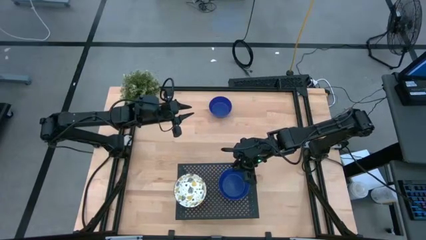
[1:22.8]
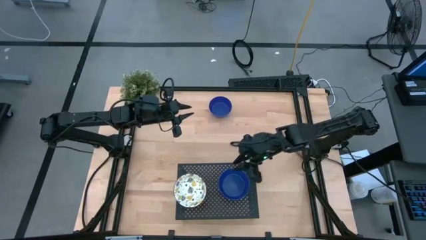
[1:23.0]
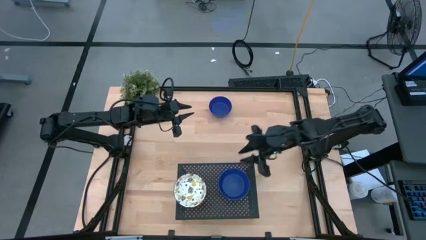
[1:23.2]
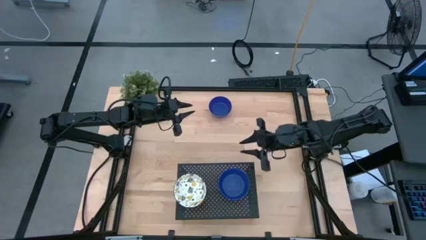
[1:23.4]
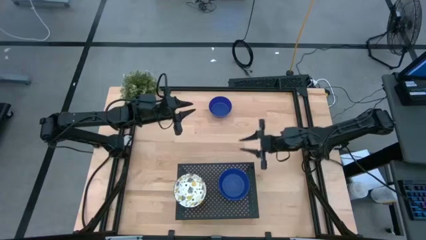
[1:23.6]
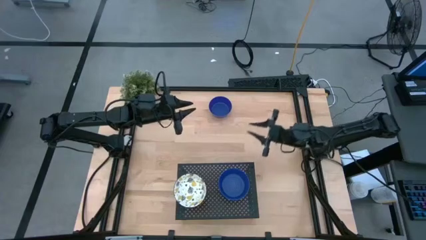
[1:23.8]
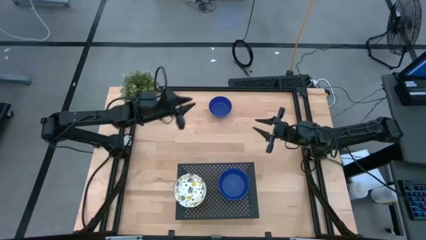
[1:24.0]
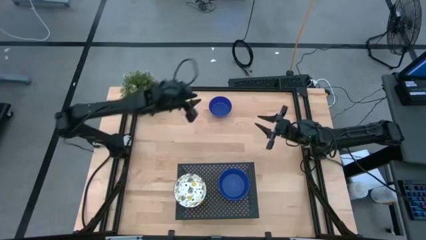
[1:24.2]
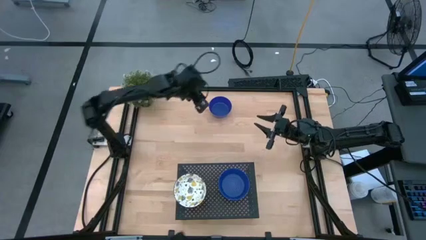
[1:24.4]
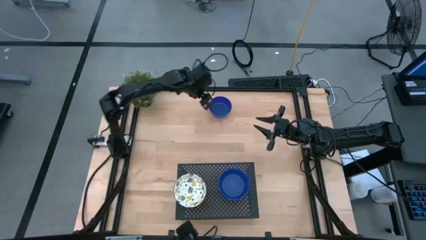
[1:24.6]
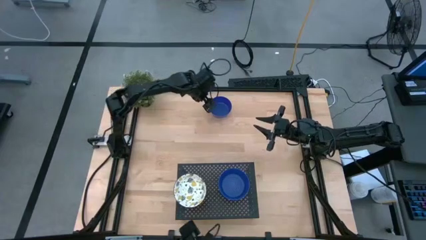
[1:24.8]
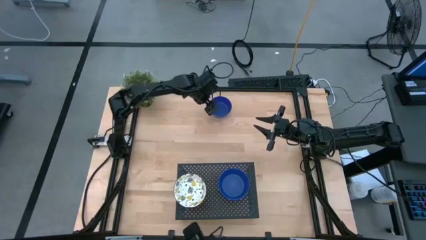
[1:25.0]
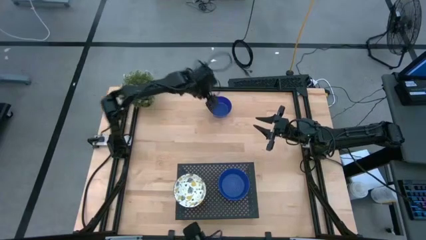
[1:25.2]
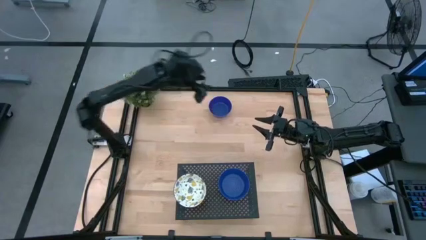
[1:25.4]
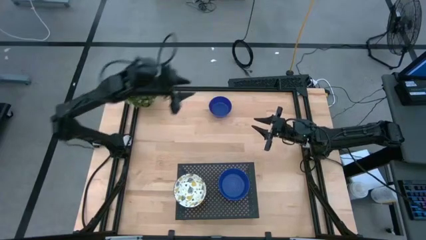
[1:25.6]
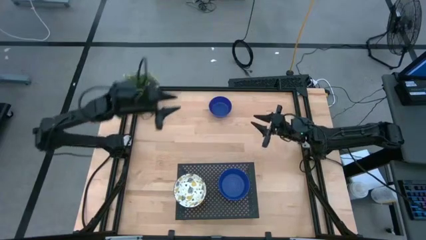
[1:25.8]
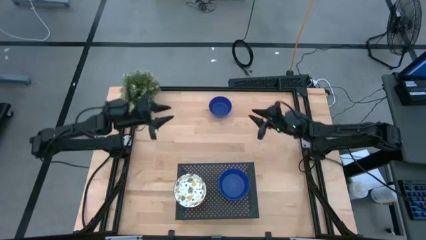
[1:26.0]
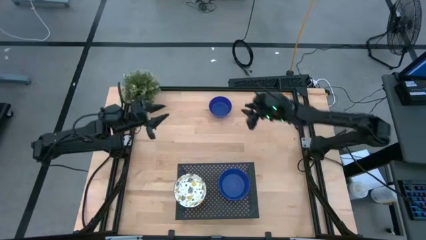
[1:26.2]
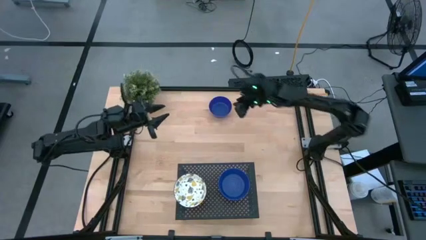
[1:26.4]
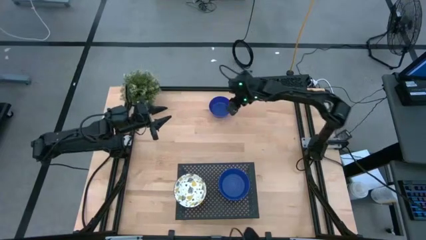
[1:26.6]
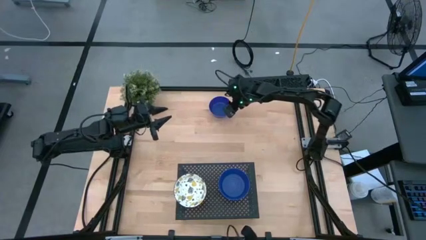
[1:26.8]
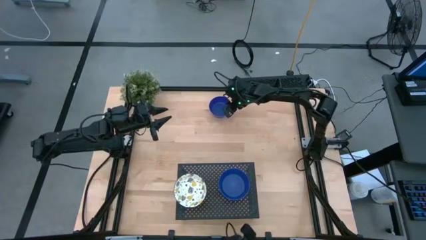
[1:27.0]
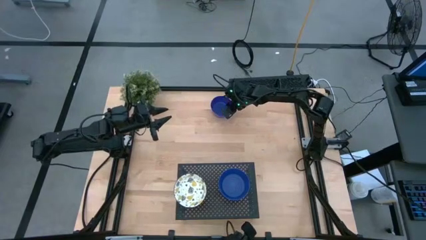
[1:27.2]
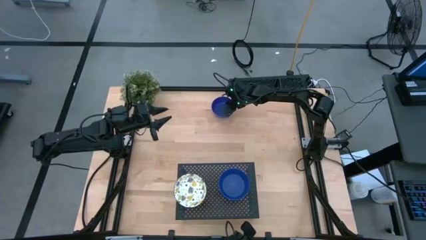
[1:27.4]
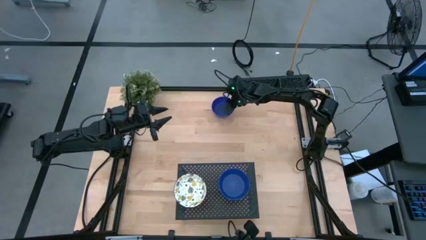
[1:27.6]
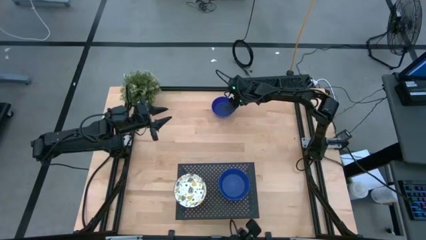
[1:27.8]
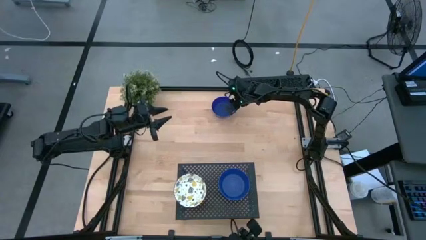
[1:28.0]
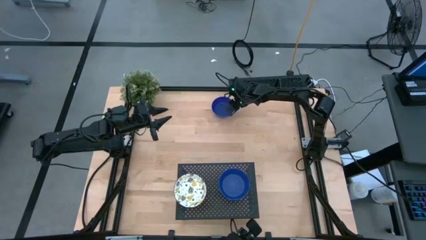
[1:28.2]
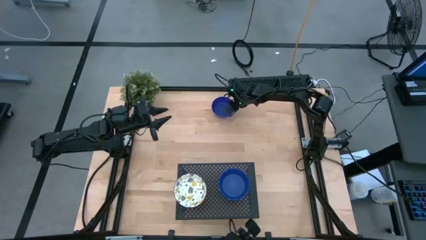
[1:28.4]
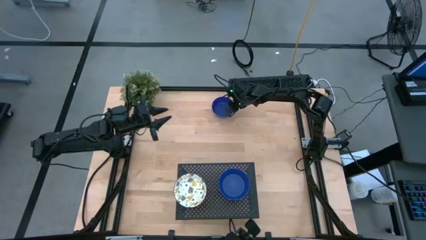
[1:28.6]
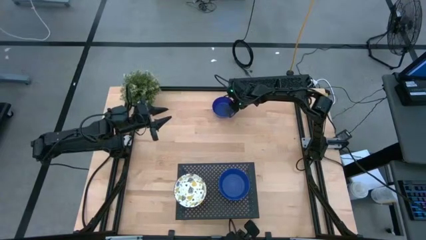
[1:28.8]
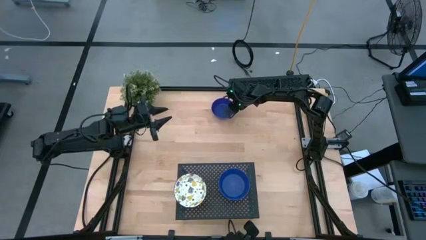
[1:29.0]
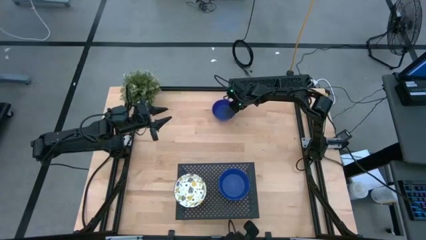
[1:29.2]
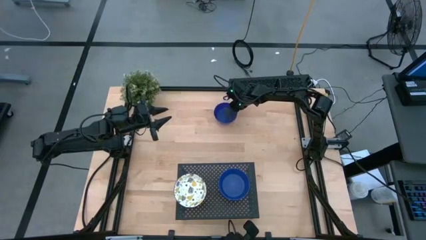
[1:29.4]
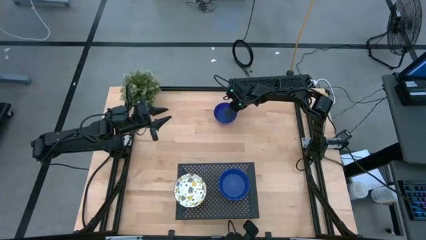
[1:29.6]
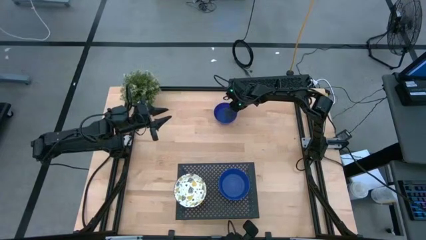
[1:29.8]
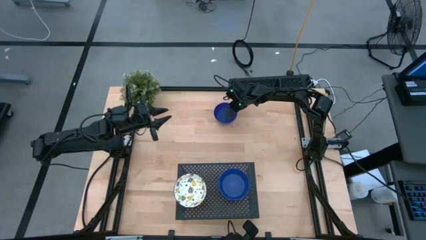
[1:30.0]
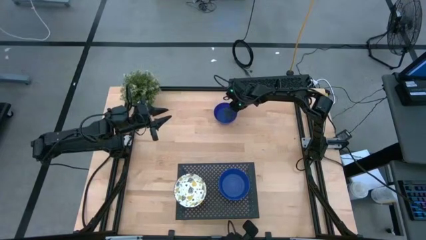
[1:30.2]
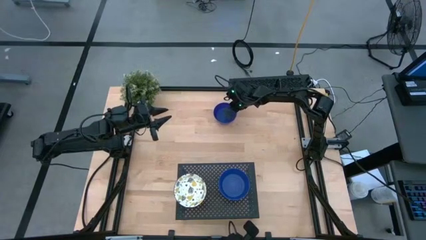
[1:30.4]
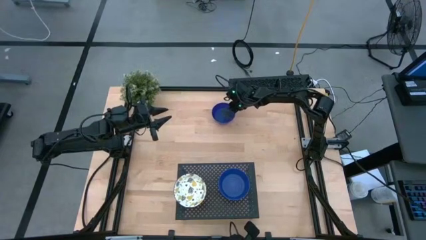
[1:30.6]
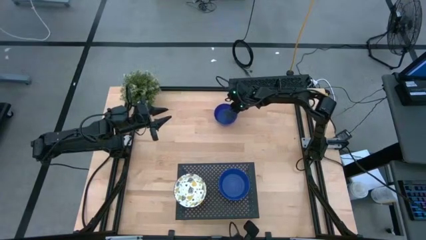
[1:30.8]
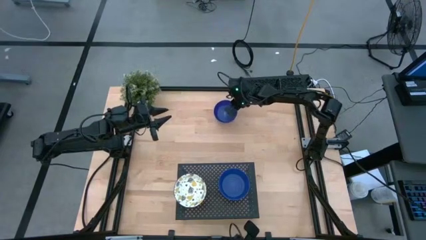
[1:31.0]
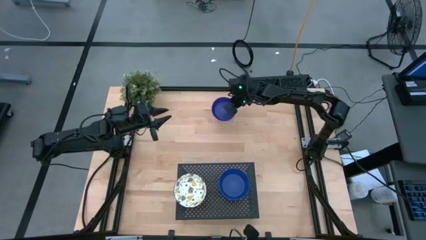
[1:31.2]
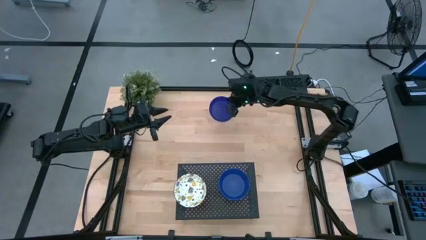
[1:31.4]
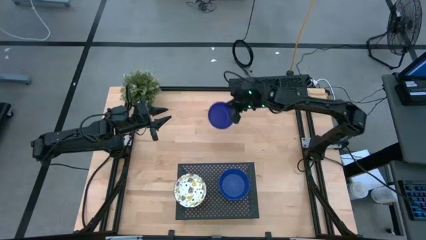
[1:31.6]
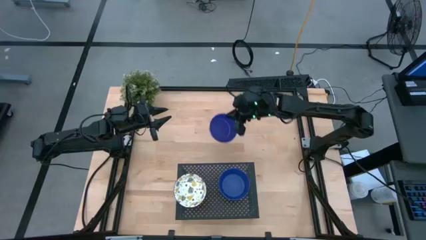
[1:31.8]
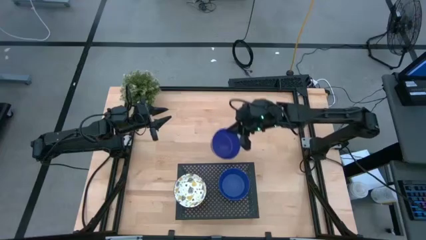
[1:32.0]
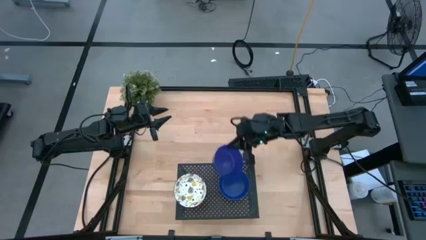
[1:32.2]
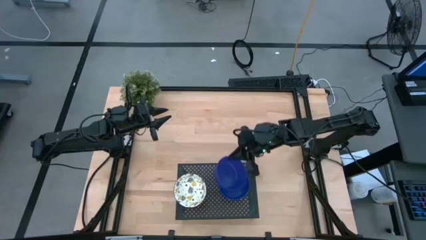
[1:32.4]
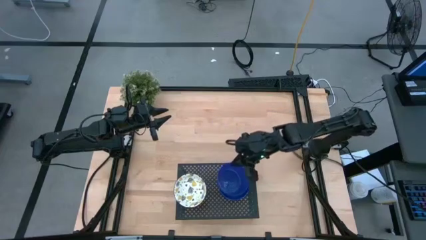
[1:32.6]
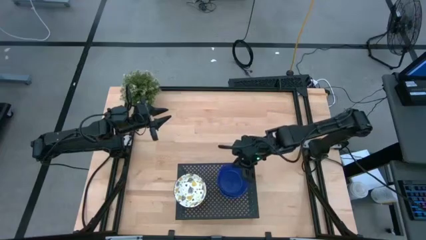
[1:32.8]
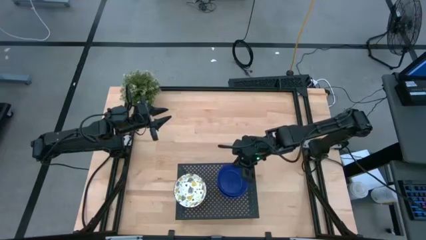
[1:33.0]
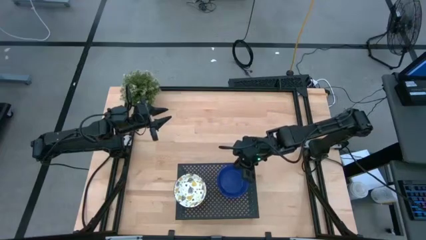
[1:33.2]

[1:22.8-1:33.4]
Task: Pick & Place Mini bowls
Stack the blue bowl on the blue bowl on the shelf

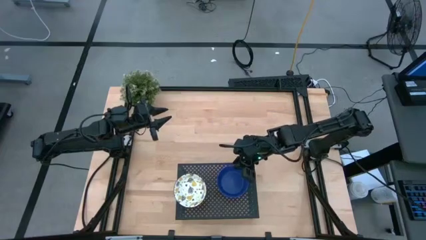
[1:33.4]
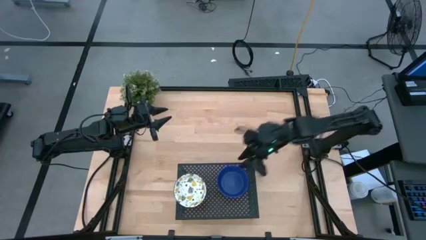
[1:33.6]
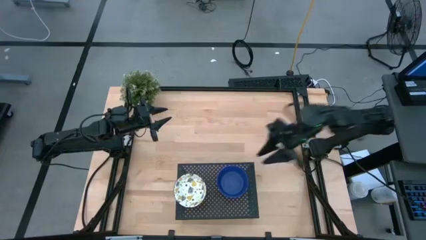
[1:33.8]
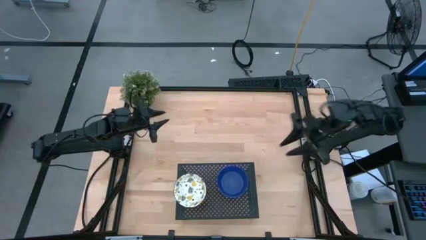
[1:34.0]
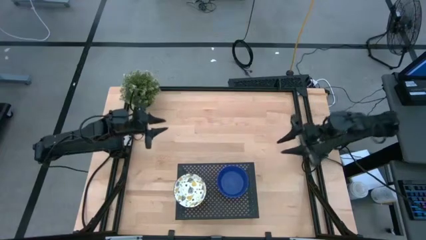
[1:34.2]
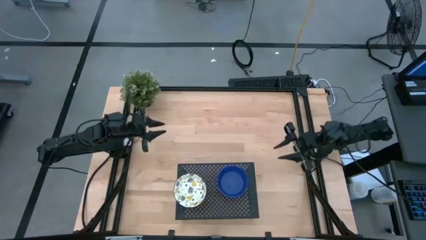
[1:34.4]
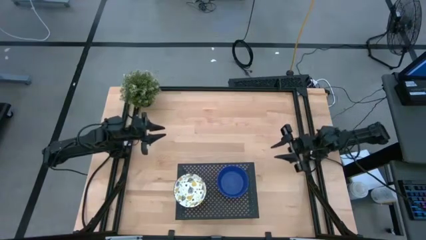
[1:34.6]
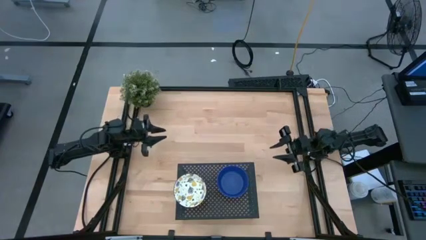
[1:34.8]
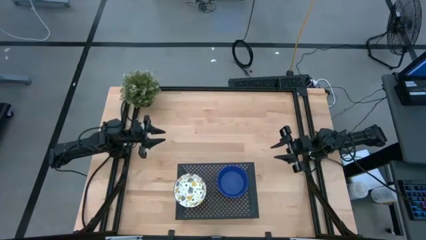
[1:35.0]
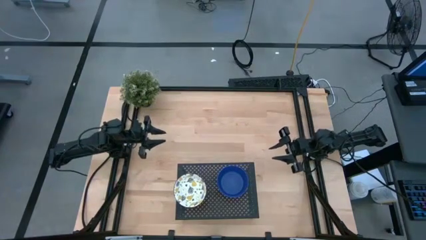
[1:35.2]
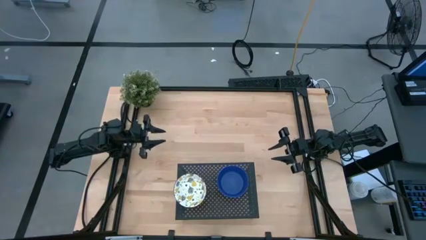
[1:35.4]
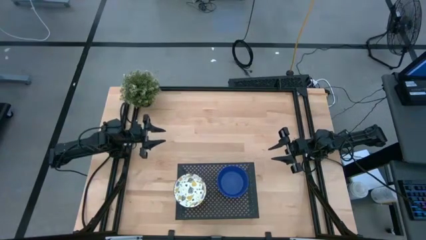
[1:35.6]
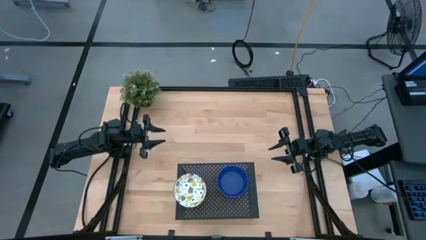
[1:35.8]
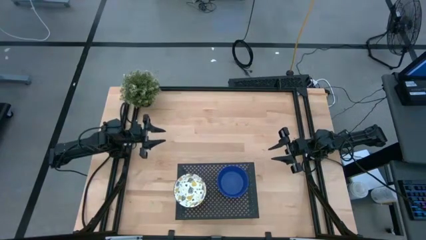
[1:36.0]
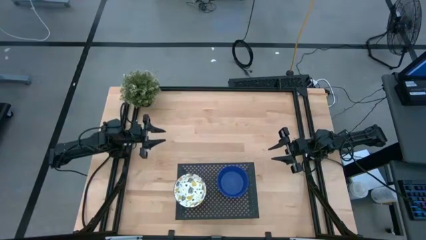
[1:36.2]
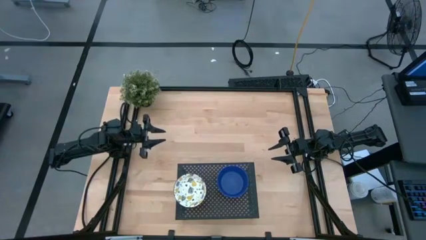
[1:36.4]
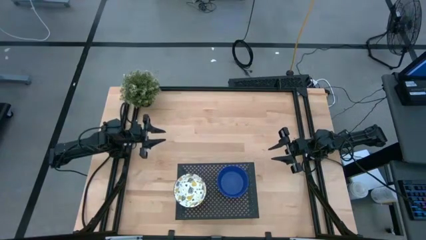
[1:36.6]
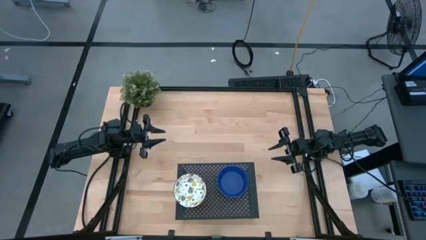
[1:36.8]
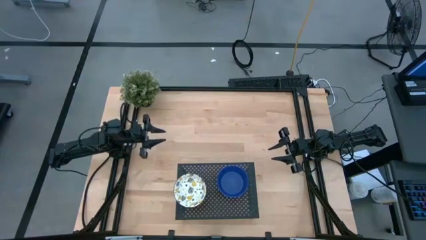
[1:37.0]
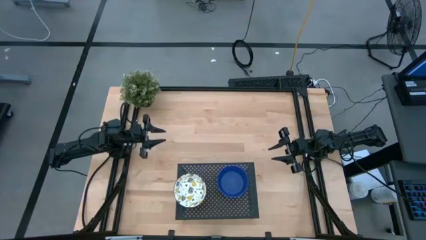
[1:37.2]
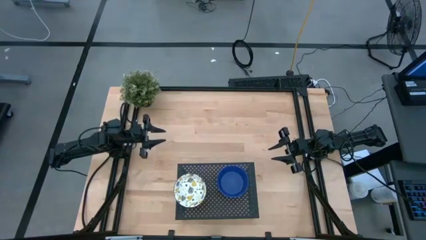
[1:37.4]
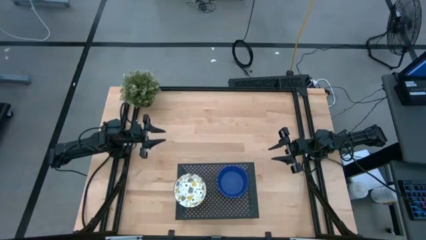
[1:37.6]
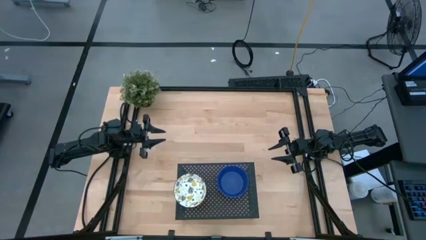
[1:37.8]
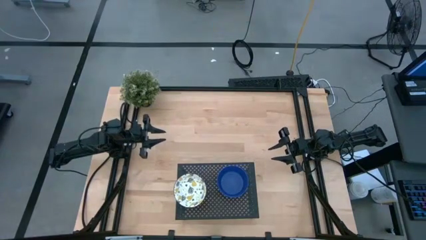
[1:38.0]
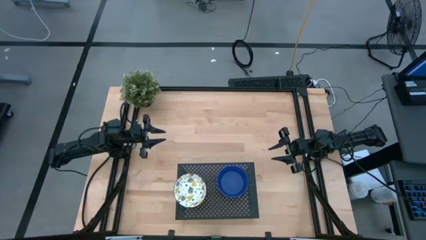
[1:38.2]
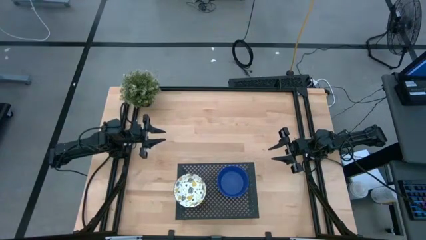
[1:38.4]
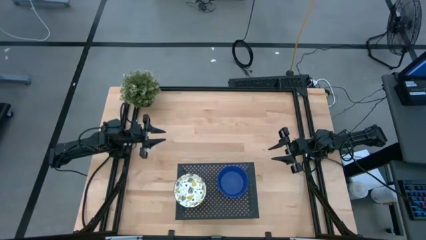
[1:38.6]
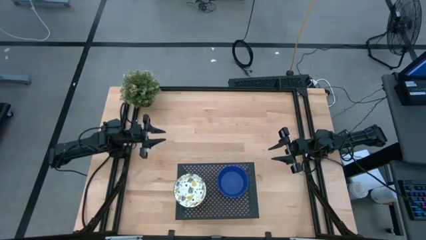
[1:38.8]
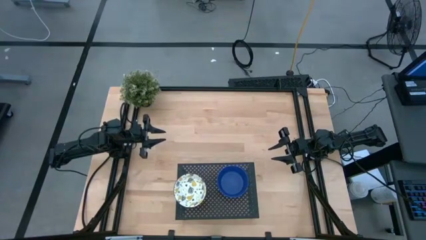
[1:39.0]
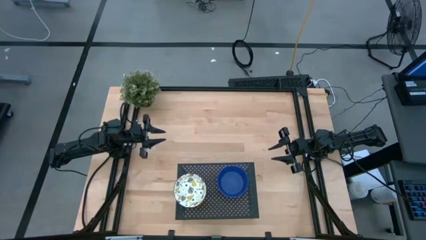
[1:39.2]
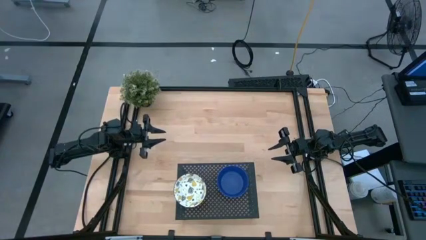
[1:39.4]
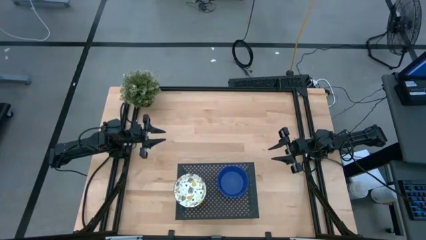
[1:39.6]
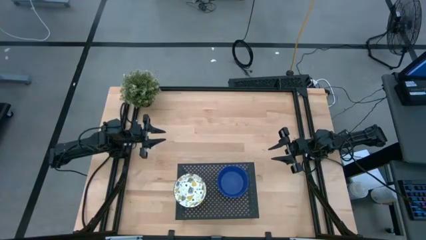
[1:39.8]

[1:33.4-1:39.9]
Return to Home Position
